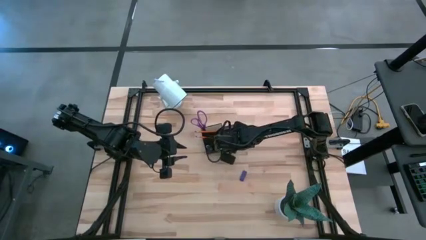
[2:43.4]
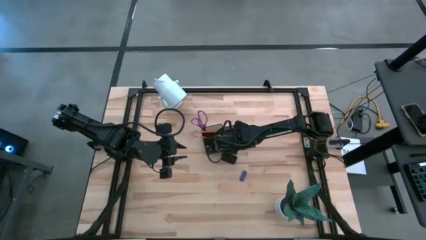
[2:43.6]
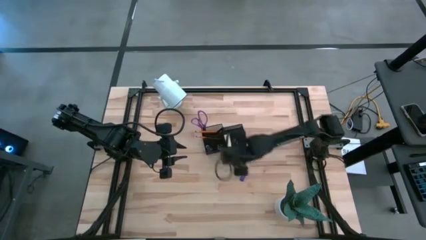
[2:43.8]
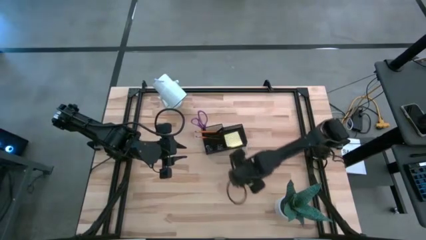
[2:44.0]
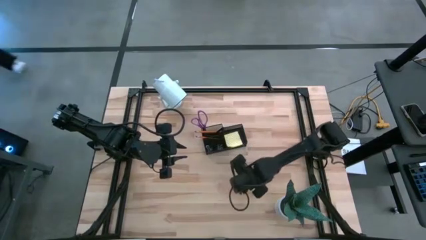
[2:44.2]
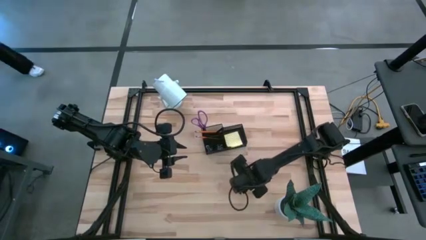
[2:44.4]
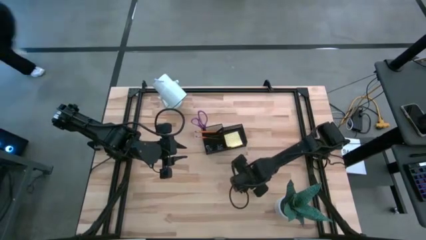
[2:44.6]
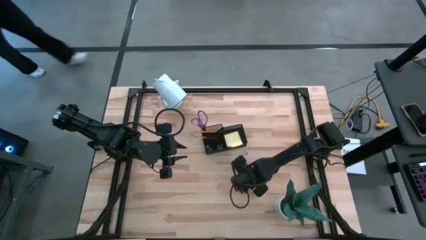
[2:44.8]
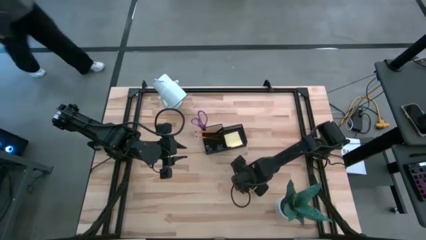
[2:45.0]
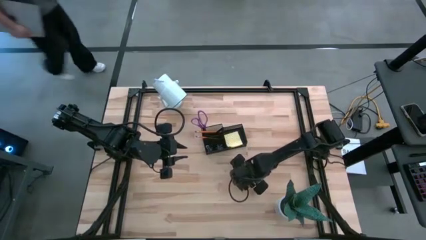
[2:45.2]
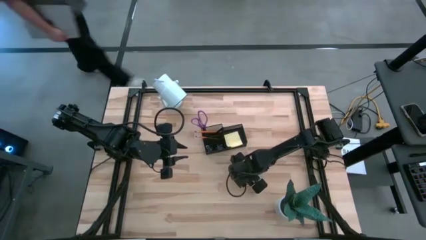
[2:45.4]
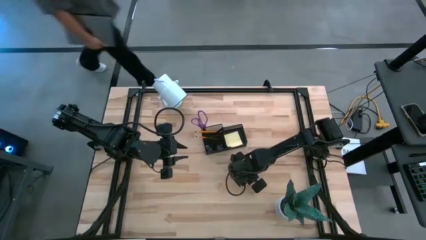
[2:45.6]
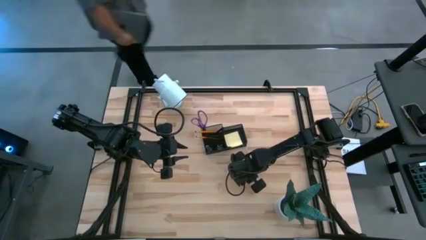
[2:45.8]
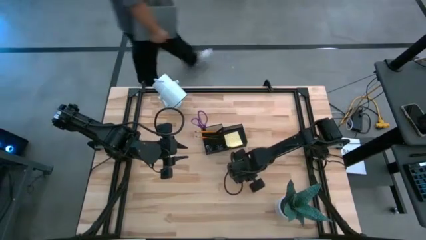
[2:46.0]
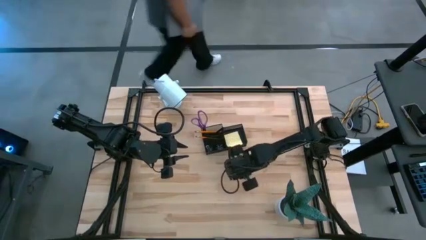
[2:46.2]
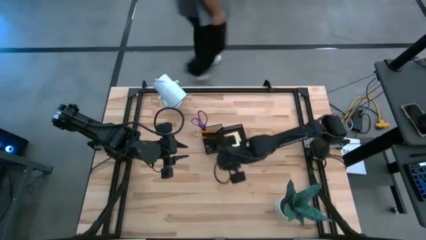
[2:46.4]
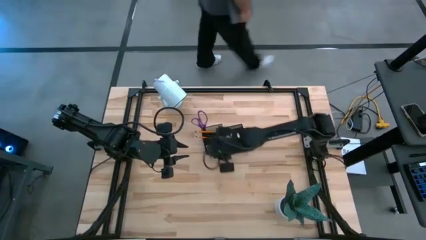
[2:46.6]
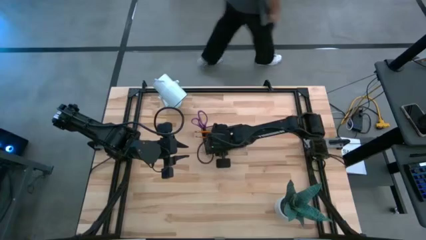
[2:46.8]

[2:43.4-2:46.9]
Task: Pick and place office supplies into organizer
Put the blue eraser into the black desk organizer

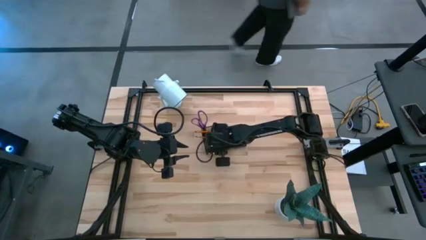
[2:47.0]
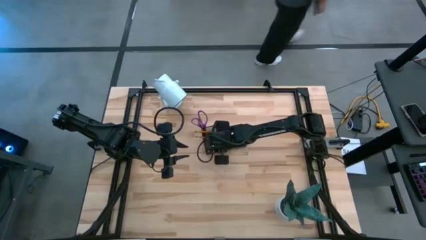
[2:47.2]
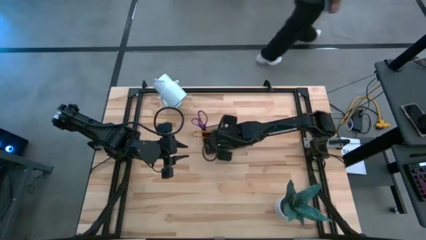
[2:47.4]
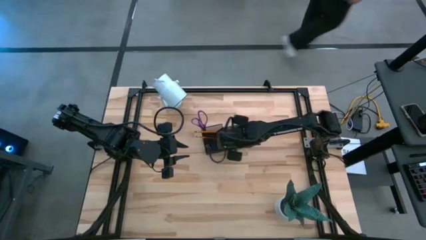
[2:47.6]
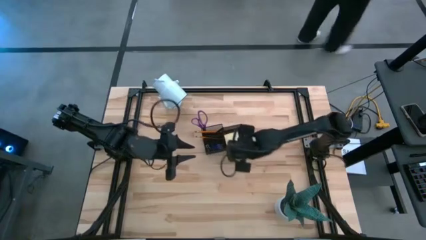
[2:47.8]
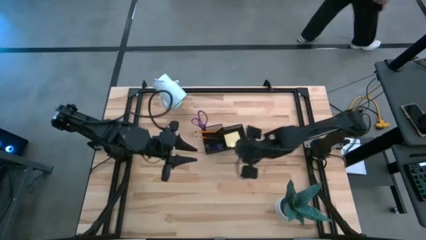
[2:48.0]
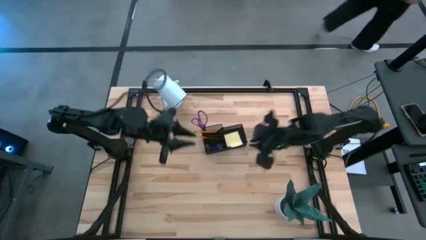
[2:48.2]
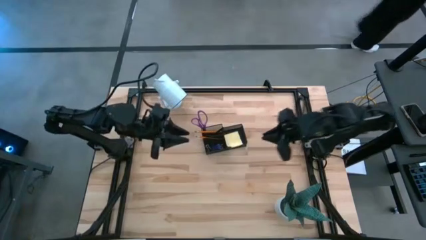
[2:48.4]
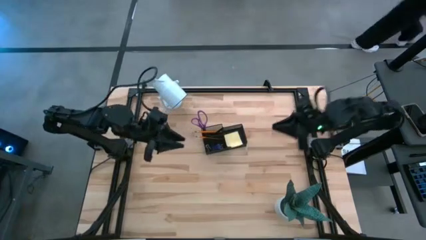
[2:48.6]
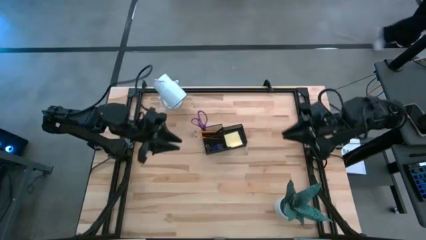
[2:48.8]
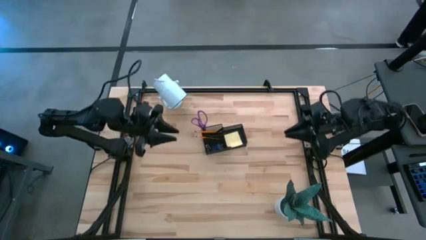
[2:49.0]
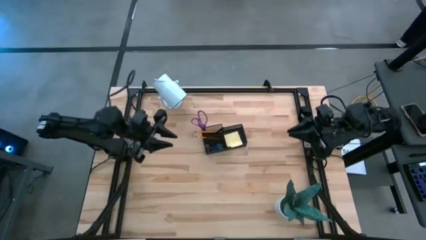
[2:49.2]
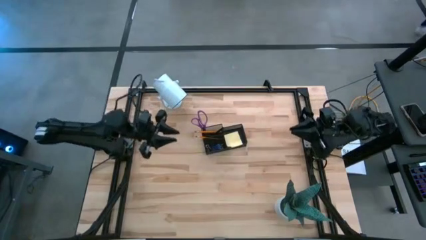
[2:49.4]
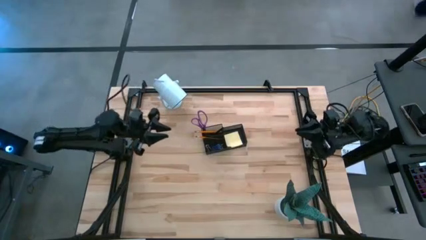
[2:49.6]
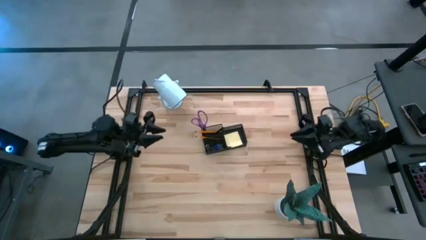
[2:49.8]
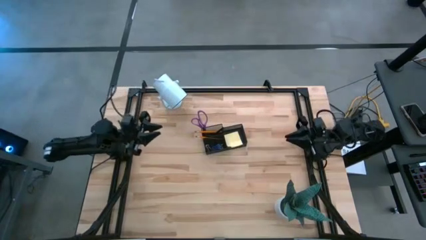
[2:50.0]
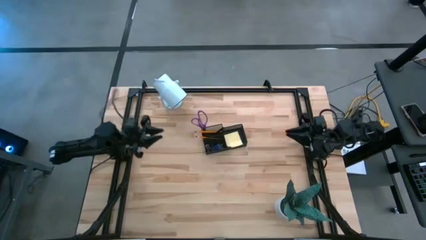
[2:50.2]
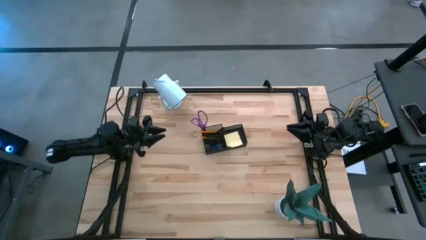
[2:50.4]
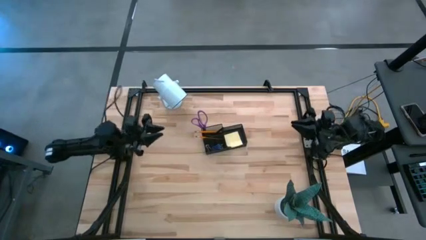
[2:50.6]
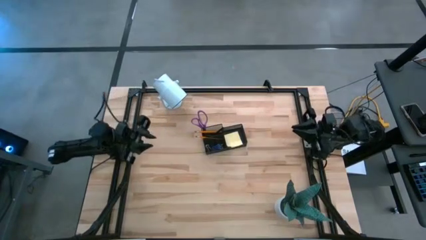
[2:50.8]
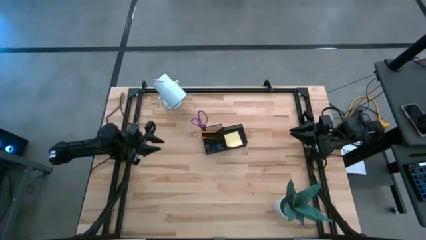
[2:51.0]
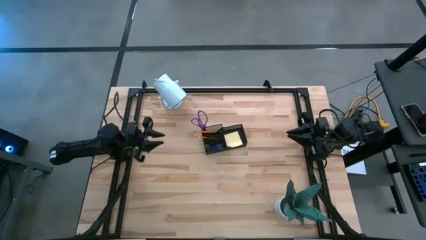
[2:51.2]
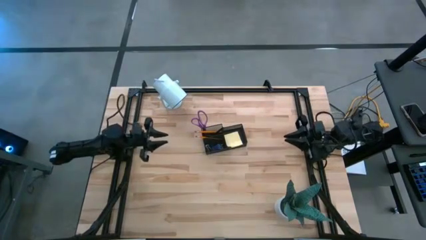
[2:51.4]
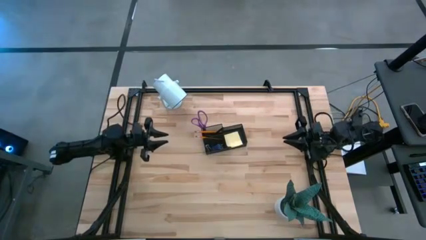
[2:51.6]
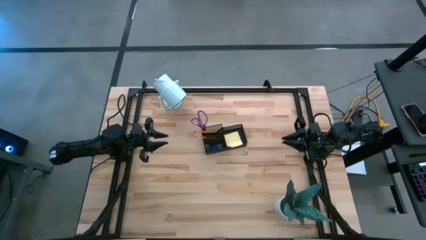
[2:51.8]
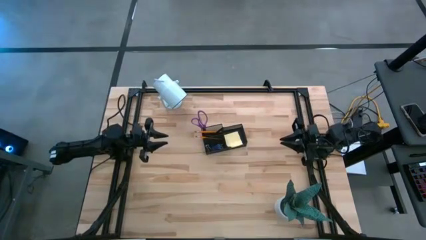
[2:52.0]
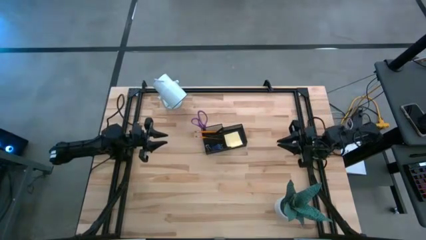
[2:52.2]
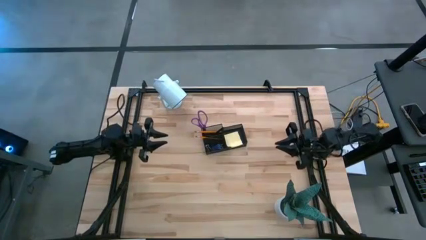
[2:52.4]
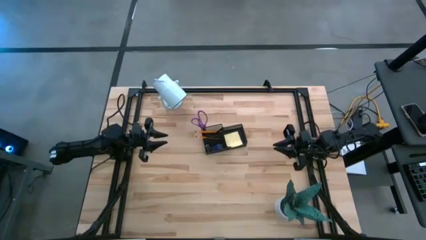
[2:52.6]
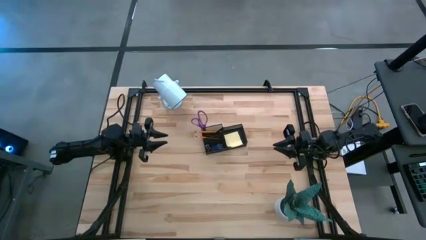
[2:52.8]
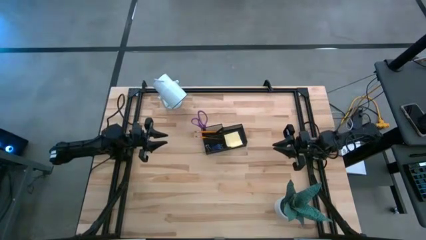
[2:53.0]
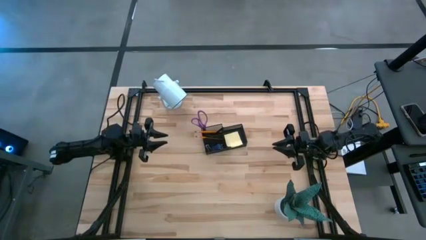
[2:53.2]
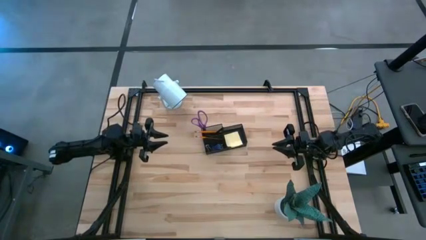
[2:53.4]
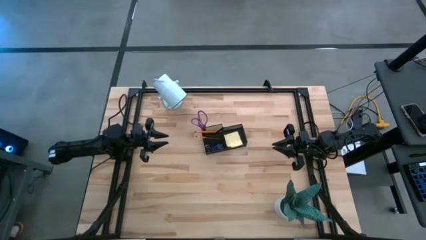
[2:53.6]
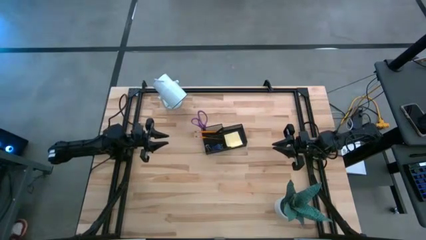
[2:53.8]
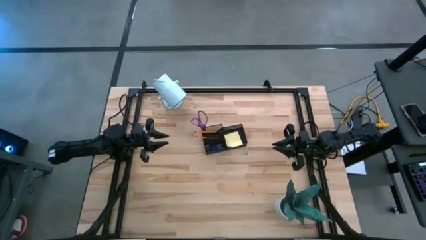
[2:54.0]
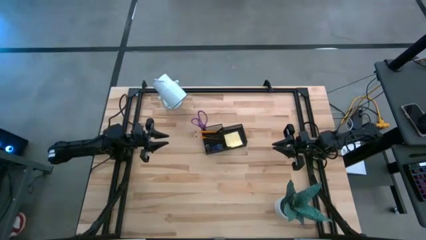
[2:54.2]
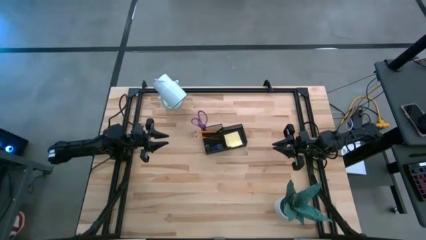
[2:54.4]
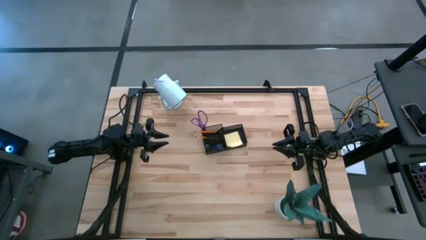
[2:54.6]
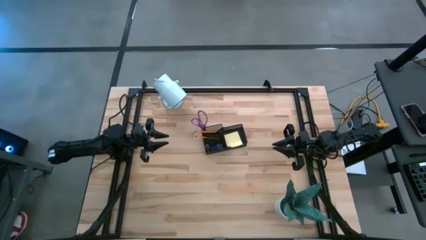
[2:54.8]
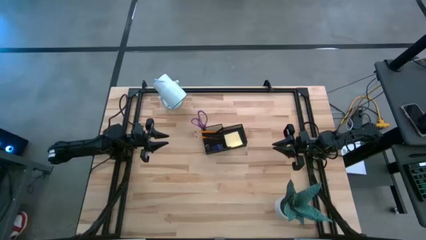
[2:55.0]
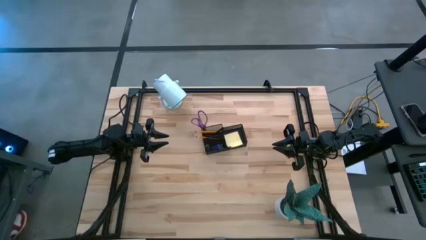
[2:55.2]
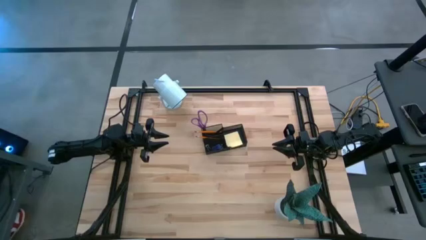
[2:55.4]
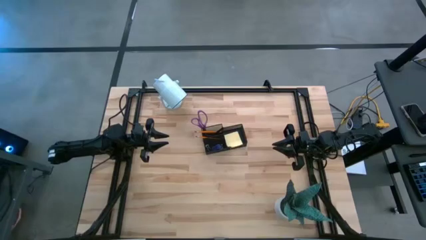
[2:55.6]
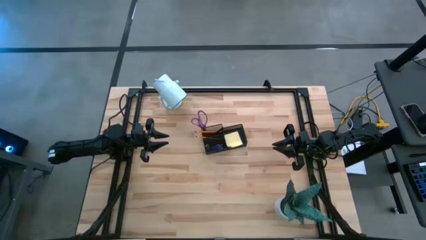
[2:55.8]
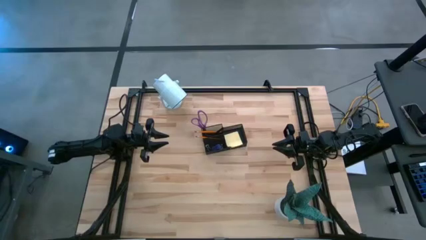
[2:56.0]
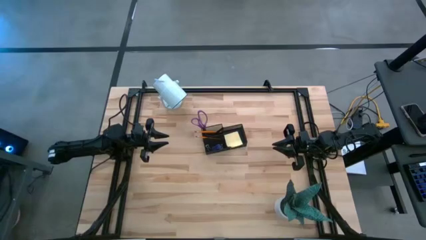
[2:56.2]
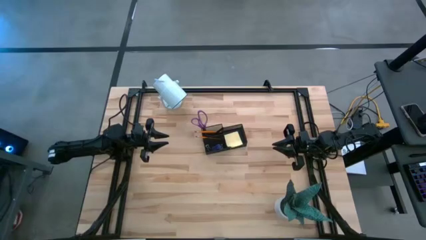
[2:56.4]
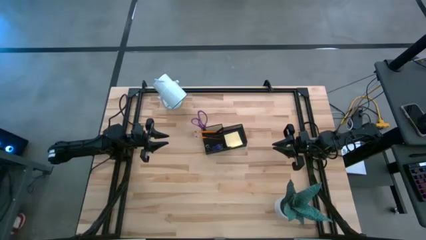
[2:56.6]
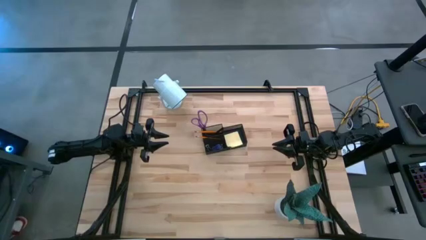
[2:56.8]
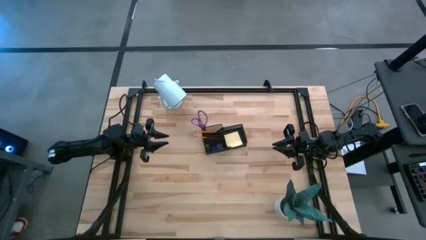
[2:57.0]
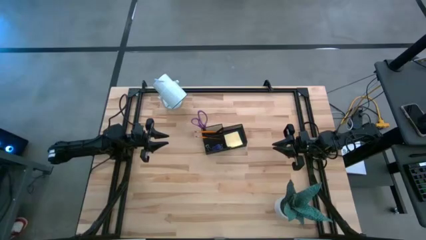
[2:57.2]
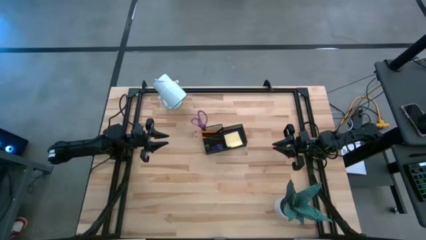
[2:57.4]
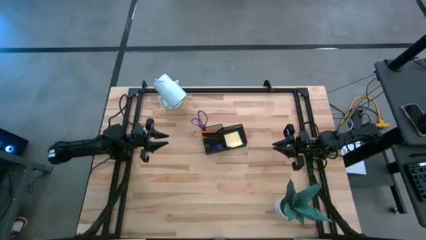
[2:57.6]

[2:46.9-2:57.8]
Return to Home Position

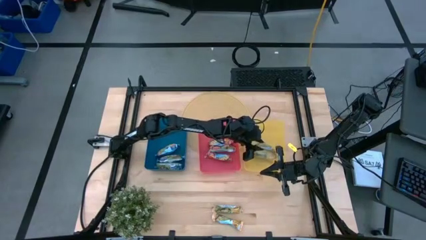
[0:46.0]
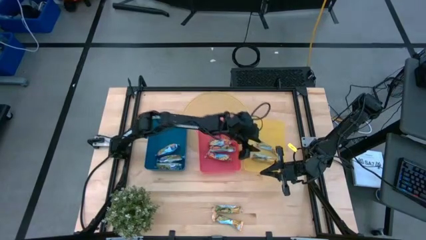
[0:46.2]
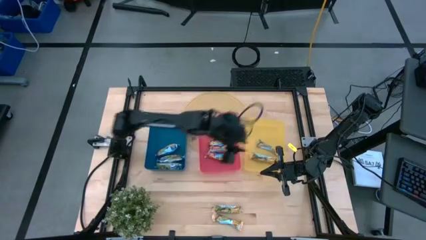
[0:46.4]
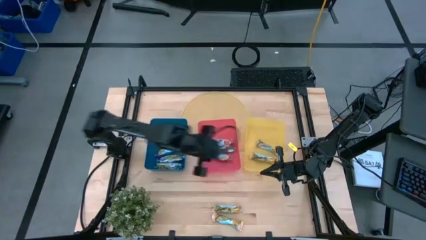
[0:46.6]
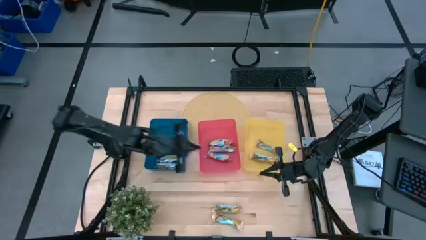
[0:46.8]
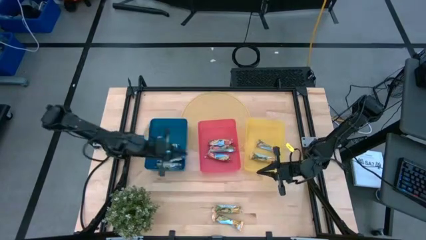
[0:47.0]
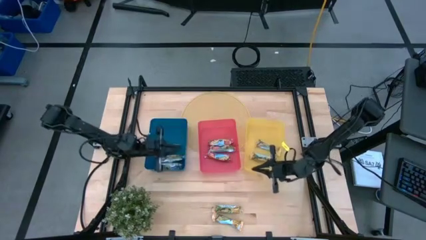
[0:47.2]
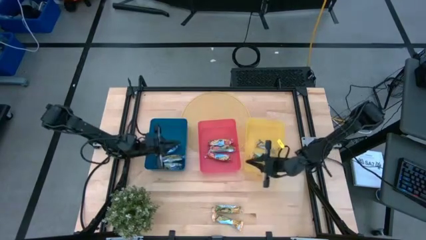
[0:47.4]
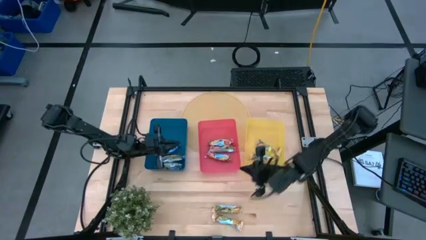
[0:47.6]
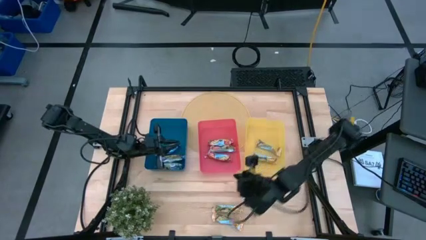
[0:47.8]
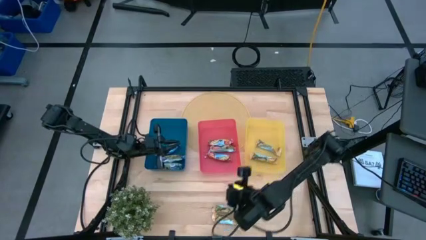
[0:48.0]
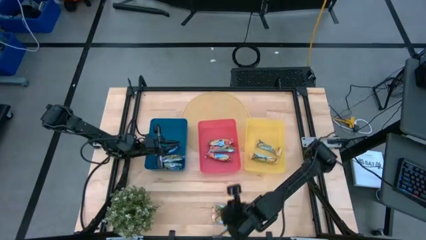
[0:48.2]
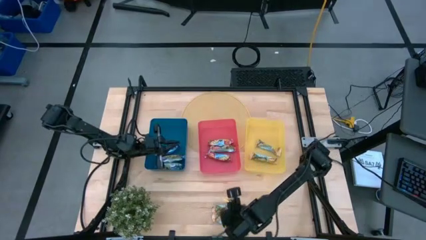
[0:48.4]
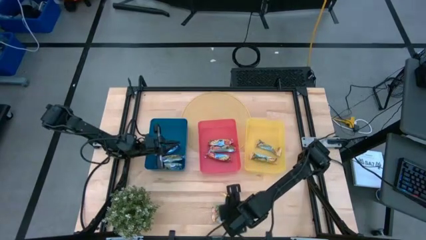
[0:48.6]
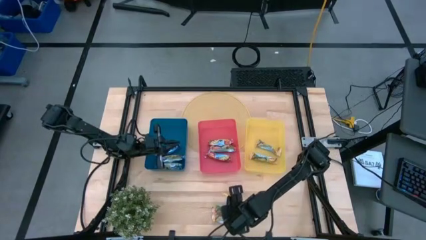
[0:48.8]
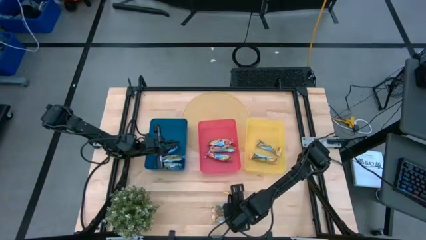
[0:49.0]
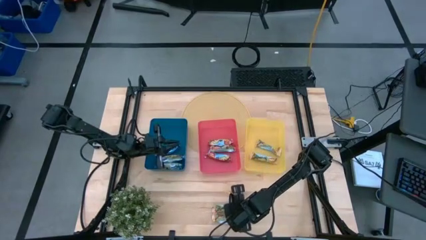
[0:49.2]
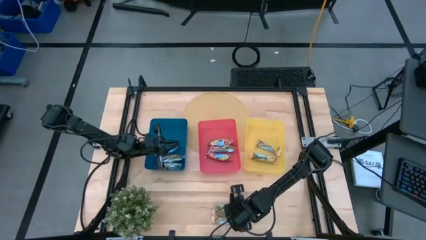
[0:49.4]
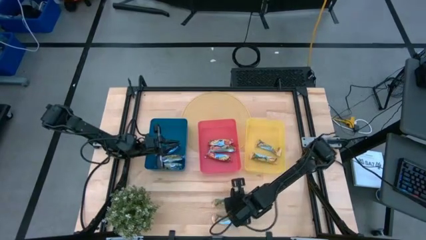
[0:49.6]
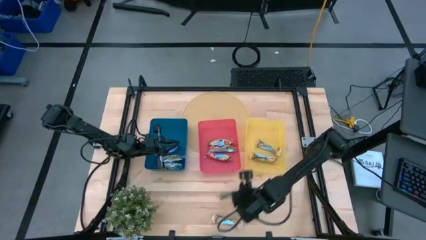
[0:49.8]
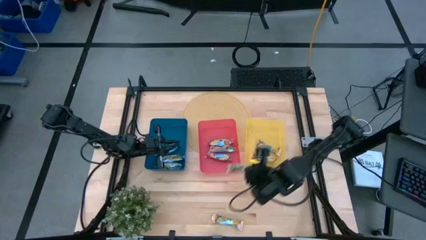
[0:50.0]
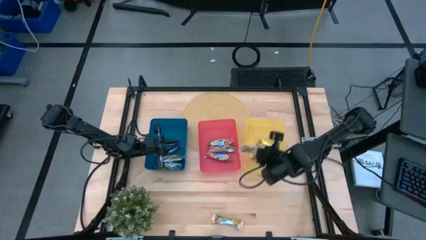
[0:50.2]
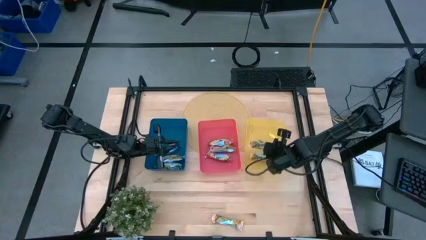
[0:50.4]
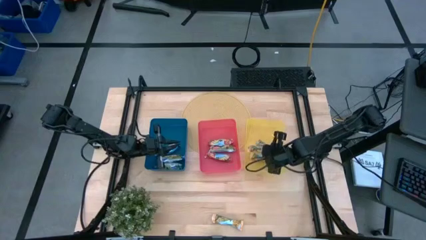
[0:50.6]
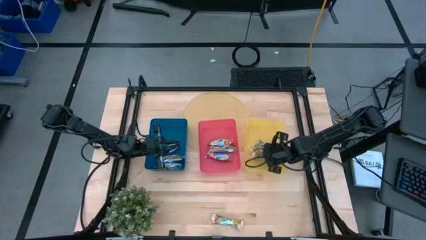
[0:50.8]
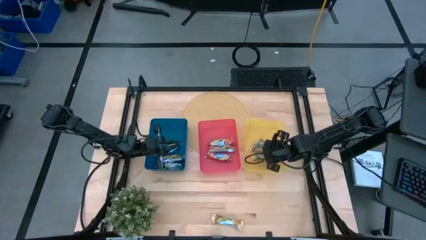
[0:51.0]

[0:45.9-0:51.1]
Task: Pick and place Granola Bars by type
Put the yellow granola bar into the yellow bin
